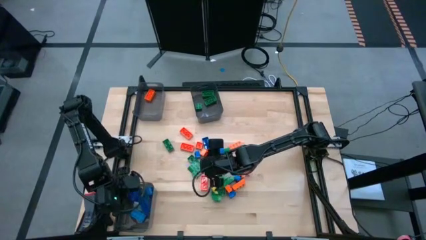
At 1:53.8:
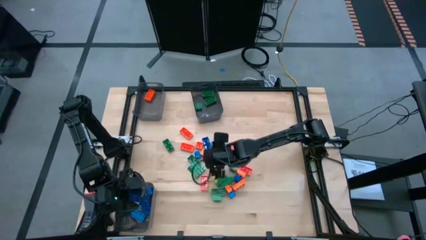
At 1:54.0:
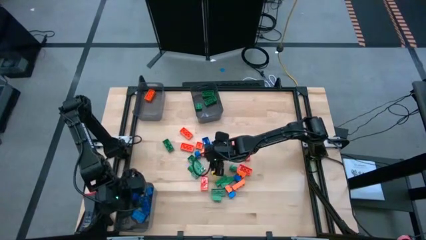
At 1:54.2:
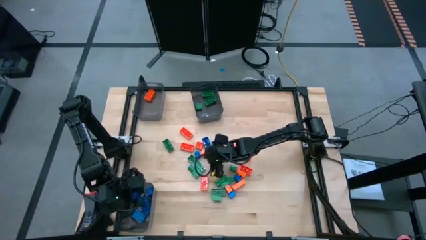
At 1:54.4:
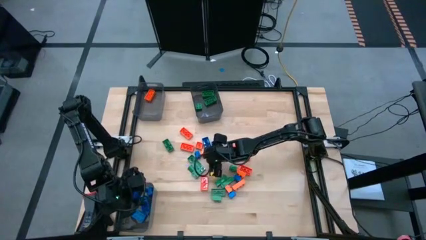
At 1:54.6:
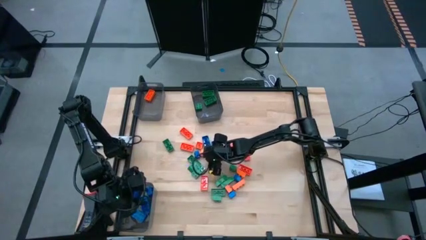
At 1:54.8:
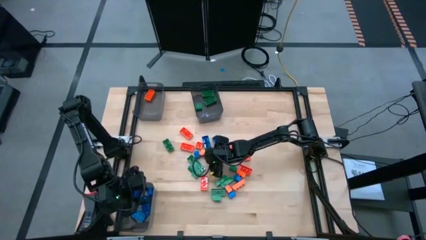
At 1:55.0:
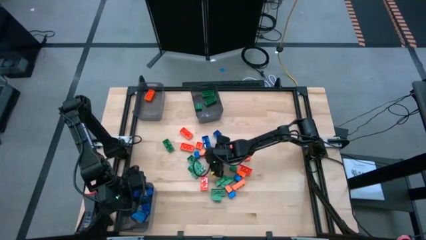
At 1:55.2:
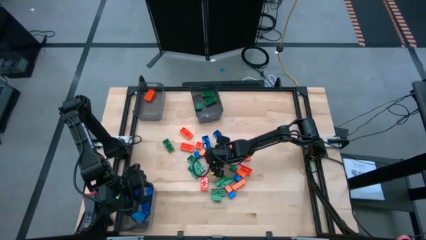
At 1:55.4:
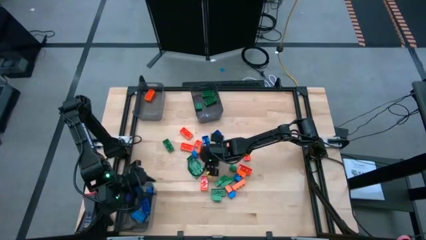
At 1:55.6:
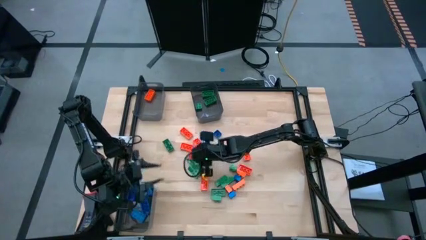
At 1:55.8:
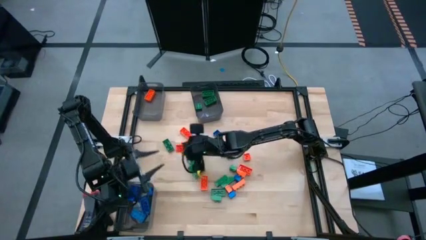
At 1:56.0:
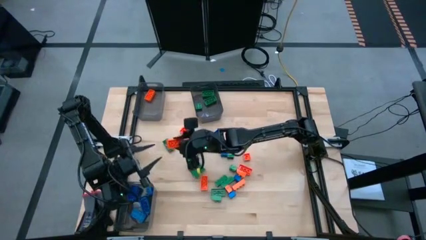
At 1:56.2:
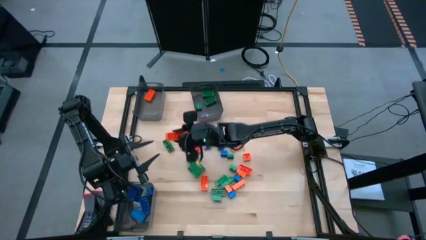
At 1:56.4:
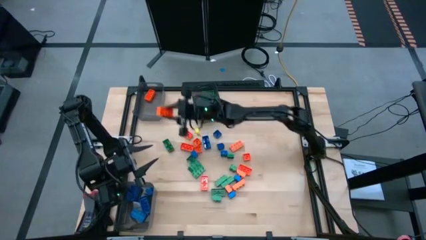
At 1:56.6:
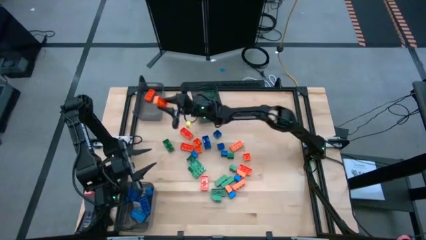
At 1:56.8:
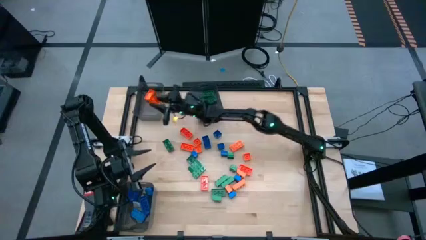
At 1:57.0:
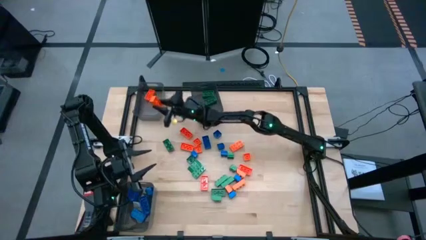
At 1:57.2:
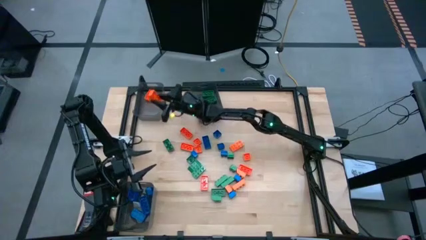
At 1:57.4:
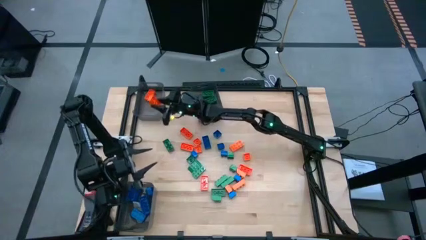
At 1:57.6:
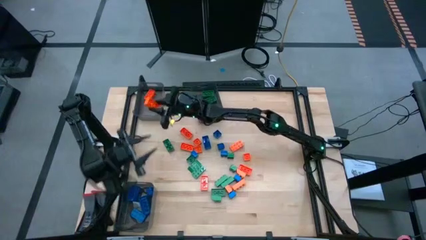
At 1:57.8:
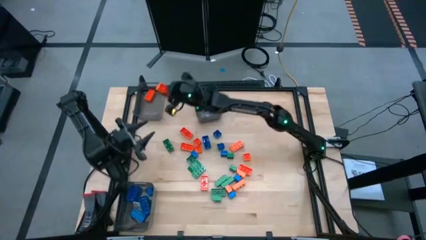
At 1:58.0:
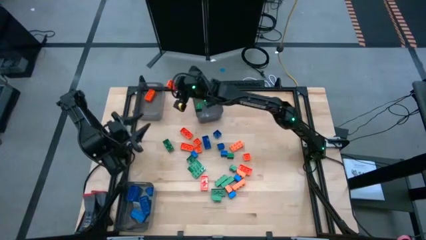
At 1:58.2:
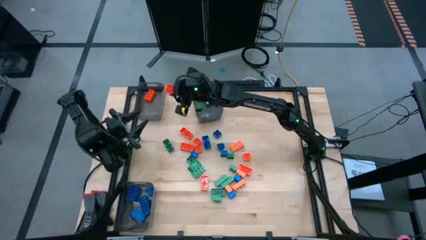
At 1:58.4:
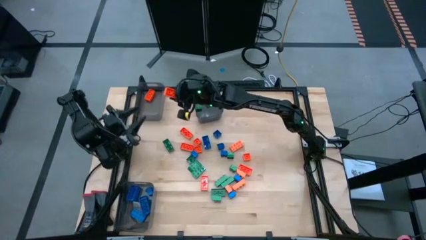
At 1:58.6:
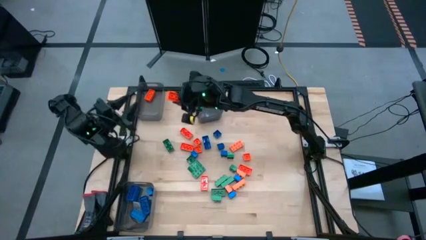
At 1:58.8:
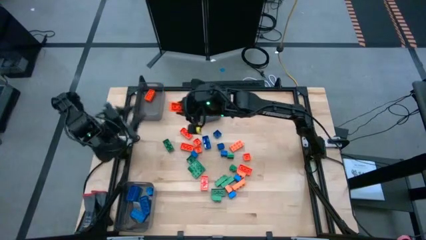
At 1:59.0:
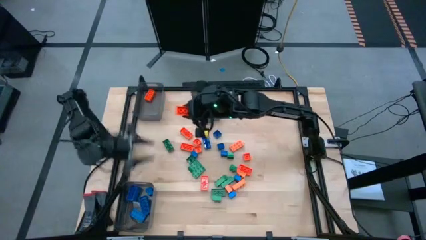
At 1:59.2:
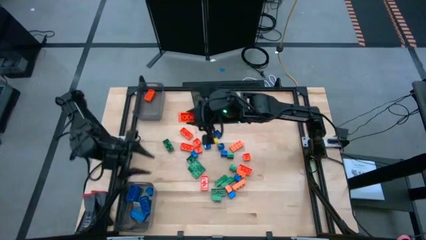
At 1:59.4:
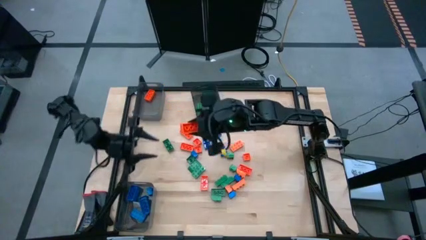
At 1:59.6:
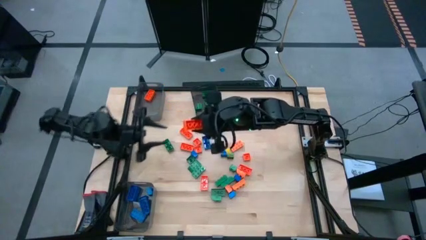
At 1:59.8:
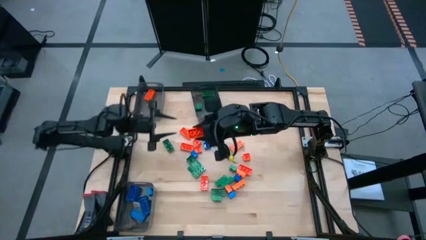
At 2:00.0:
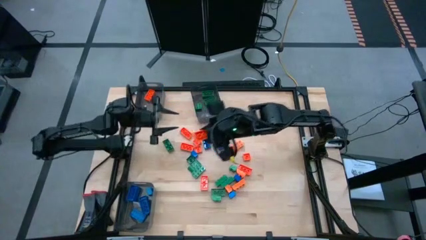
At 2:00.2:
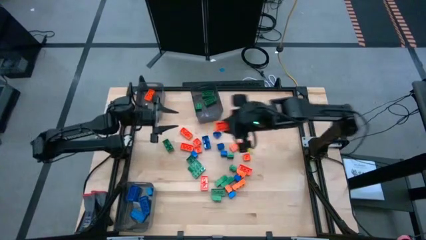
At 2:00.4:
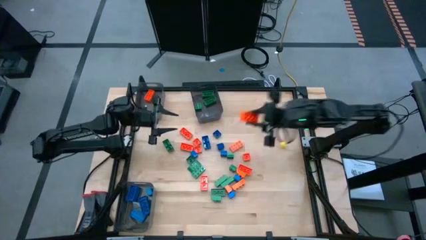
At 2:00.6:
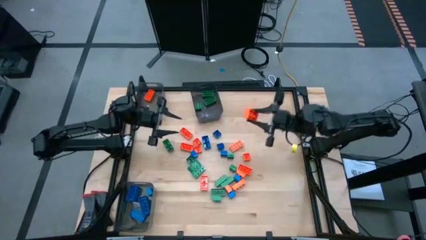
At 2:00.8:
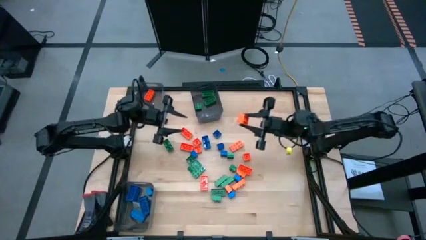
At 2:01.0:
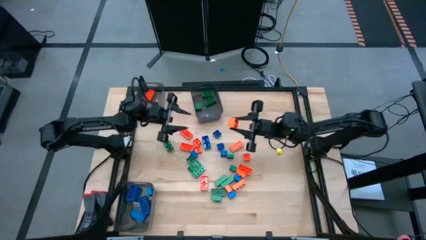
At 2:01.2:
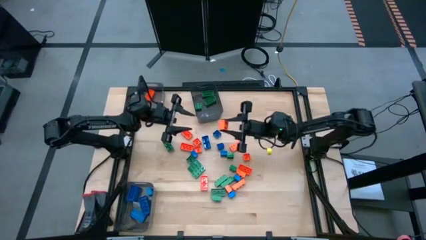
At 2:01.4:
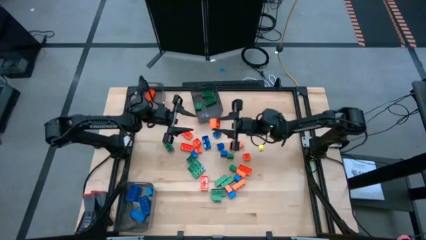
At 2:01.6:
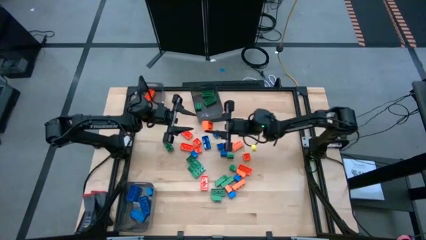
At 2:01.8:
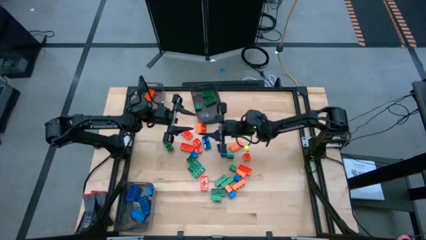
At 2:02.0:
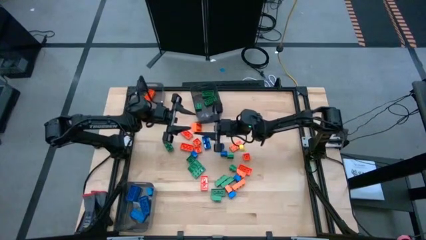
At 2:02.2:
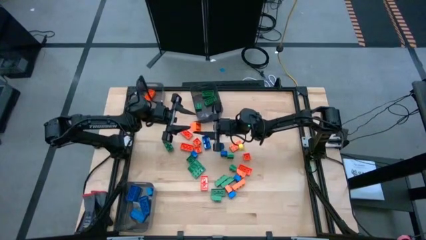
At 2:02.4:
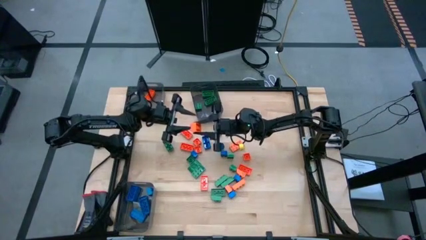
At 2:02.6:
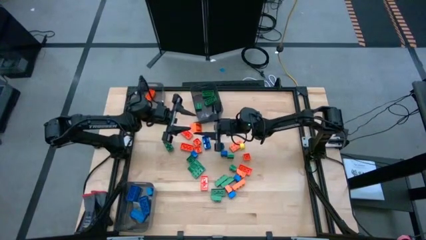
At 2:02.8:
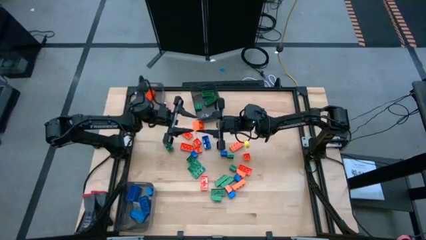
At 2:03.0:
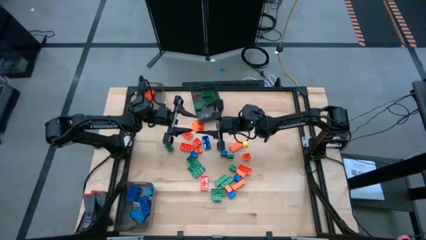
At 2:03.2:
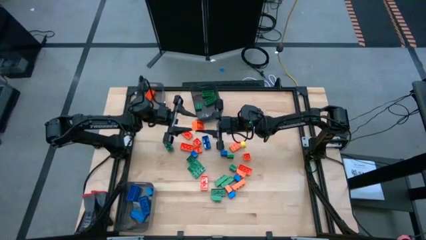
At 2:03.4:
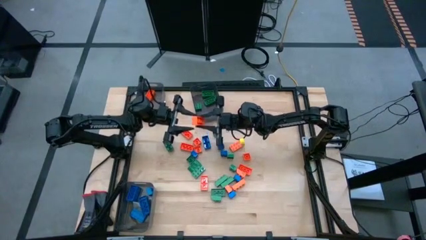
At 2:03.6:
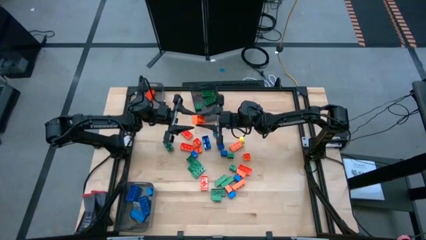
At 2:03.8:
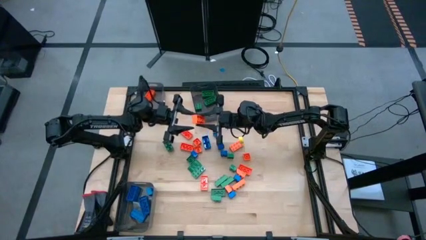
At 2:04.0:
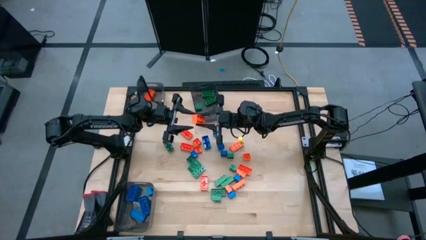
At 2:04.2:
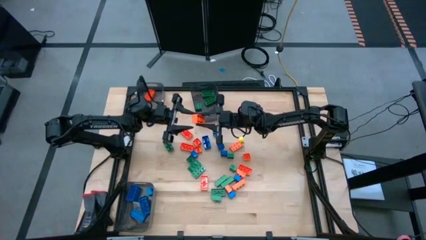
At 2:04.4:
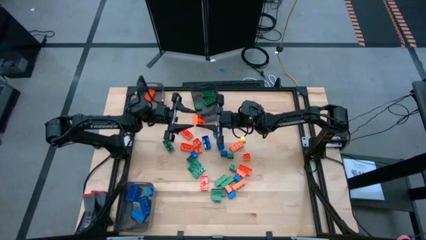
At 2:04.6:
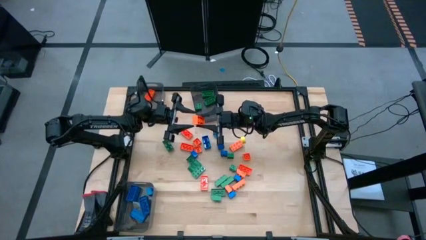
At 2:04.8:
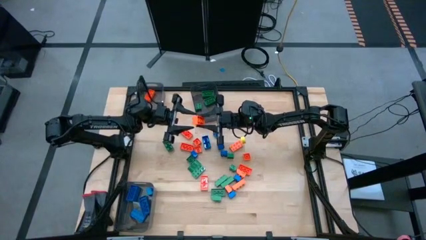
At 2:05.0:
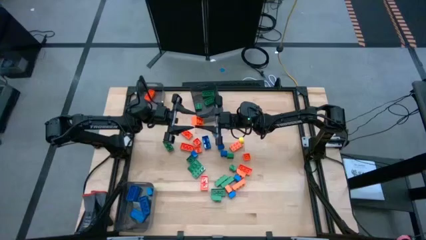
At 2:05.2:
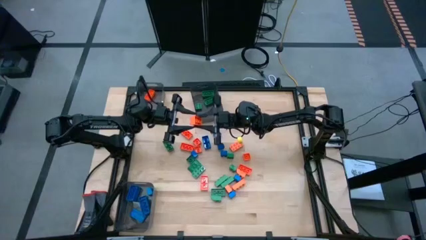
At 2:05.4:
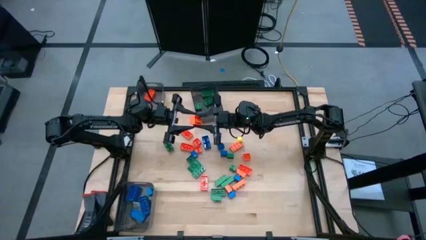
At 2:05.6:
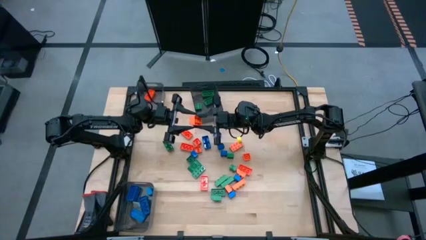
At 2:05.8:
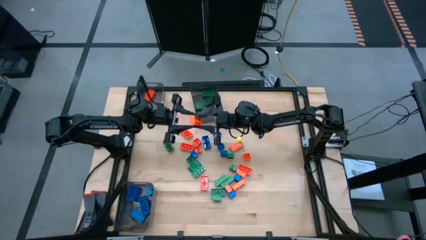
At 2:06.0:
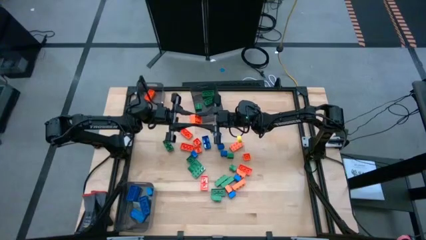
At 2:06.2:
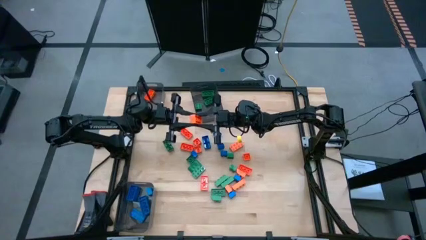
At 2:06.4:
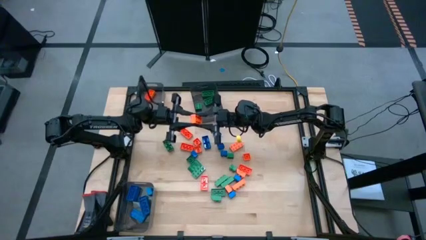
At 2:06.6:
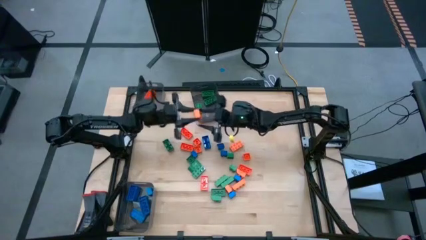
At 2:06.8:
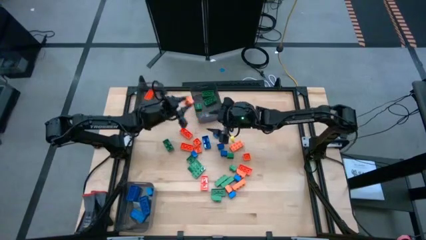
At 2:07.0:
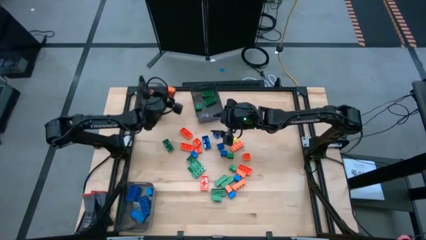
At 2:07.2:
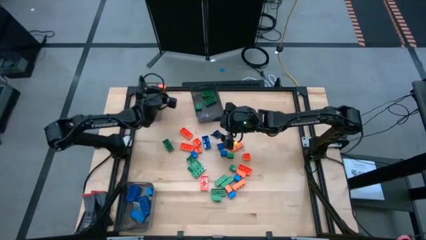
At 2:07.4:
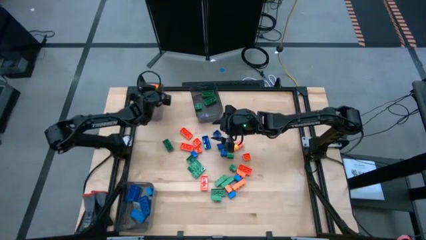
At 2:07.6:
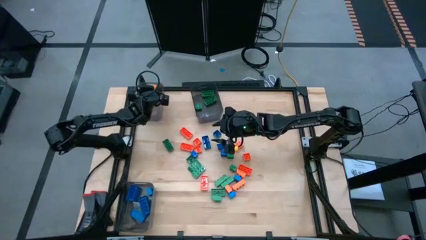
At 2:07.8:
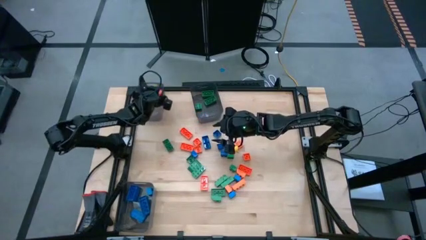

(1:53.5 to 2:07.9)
Task: Sort blocks
Put the orange game piece into the top left black transparent bin

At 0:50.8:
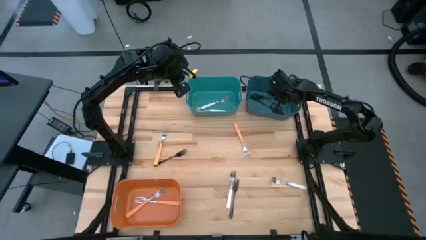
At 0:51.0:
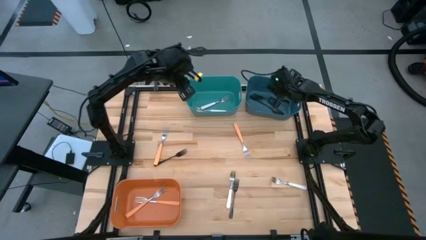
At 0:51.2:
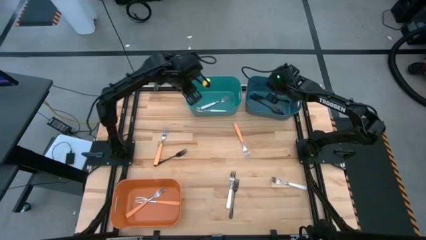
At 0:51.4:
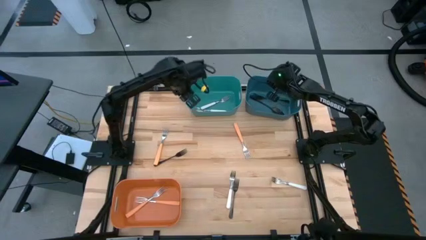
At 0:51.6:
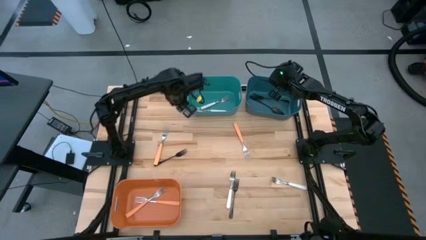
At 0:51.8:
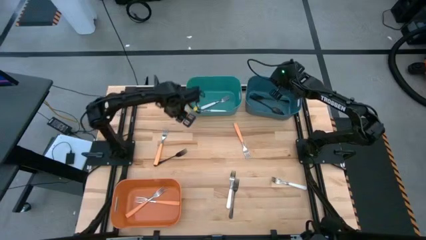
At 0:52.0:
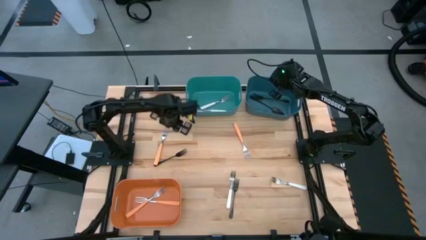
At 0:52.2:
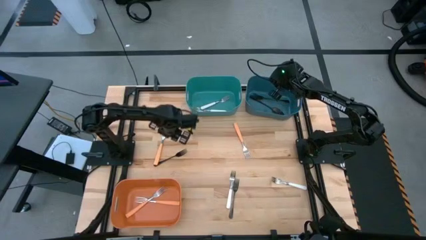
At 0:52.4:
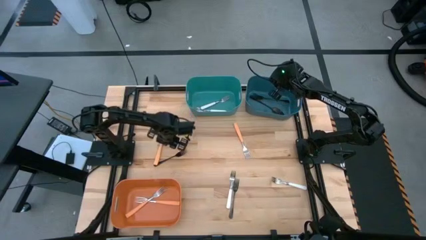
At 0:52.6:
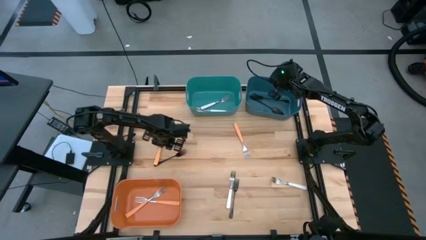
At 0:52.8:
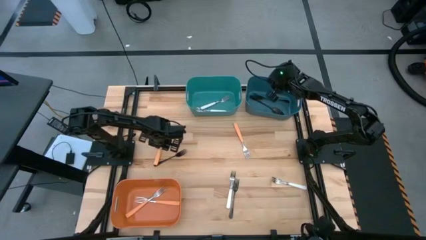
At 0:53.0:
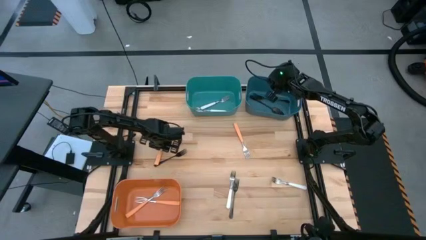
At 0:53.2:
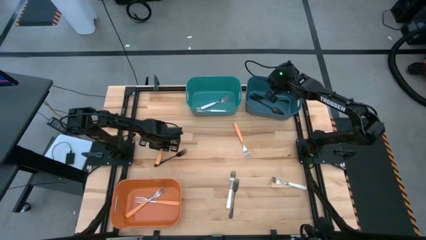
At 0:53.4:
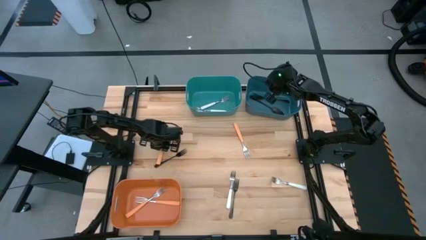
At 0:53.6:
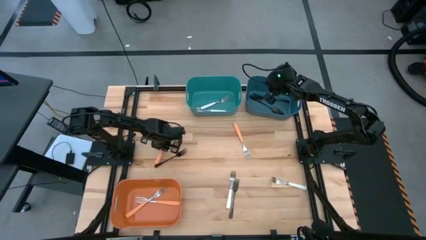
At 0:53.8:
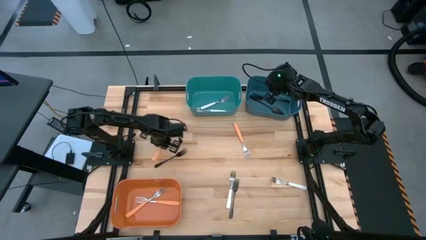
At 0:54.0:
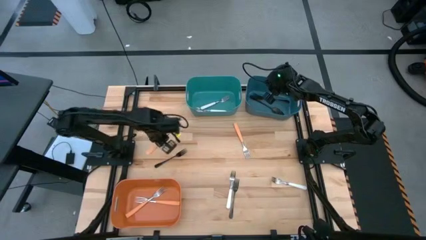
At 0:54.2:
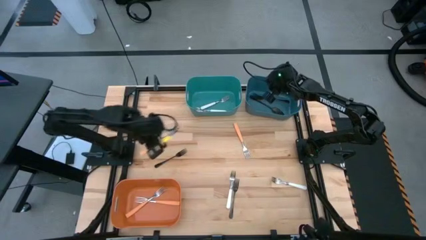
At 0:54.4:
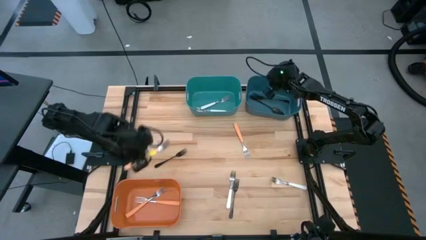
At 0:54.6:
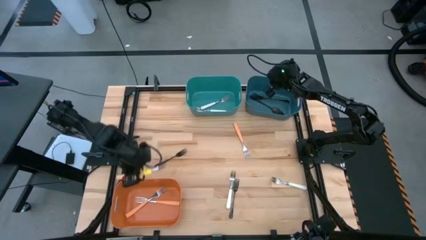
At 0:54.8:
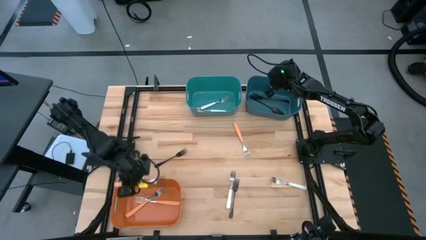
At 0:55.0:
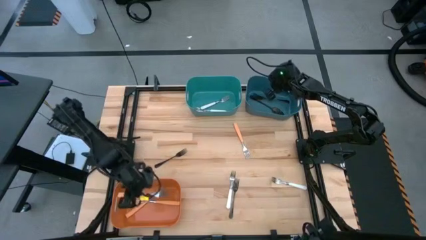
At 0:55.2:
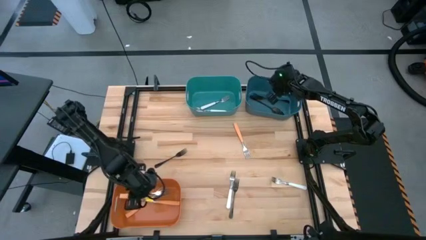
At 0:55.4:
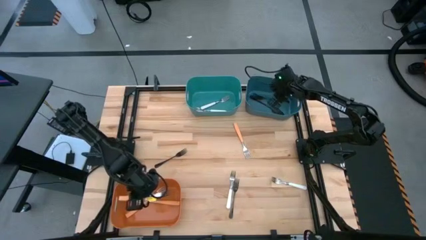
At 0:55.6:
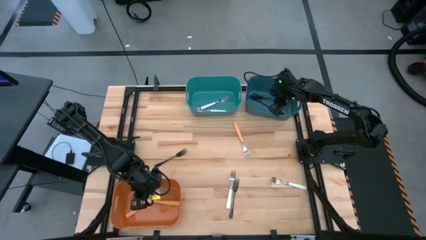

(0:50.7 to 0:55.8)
Task: Sort silverware by color (type)
Put the left orange fork into the orange bin
